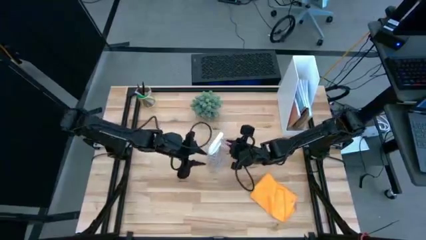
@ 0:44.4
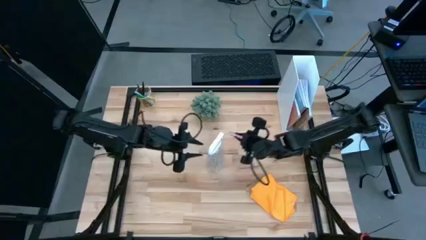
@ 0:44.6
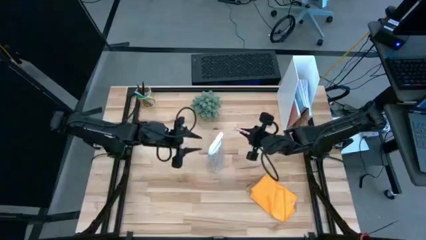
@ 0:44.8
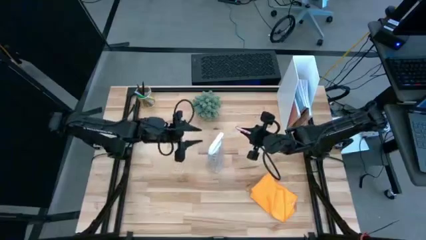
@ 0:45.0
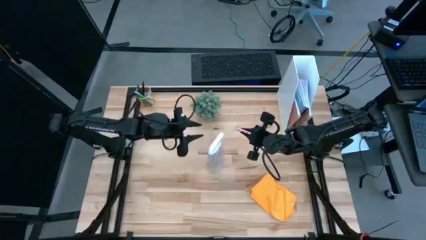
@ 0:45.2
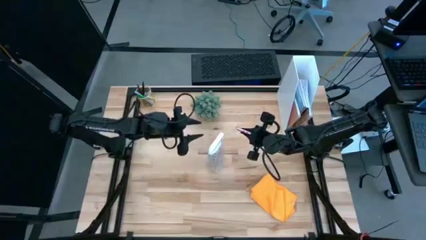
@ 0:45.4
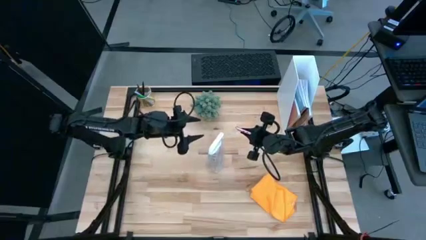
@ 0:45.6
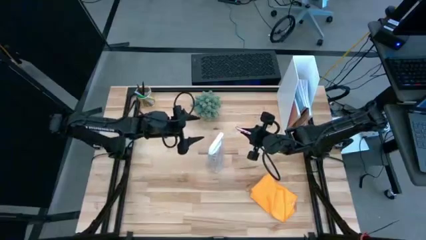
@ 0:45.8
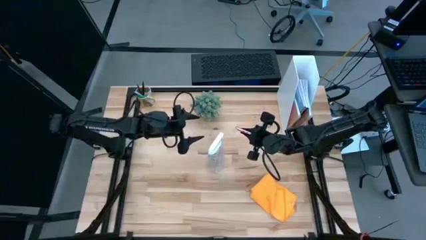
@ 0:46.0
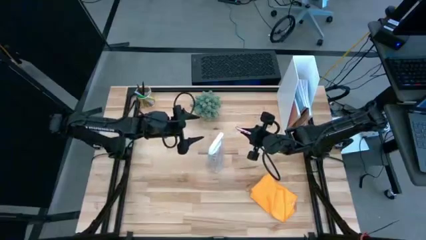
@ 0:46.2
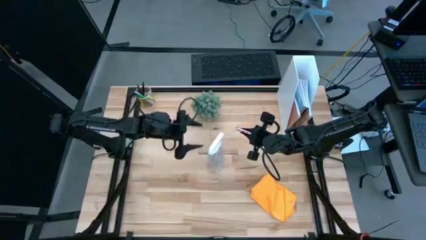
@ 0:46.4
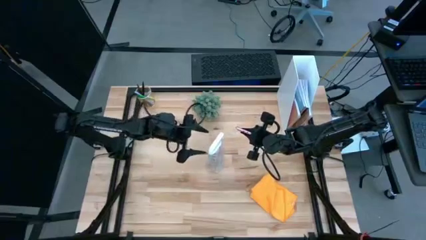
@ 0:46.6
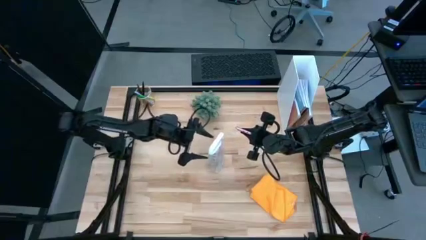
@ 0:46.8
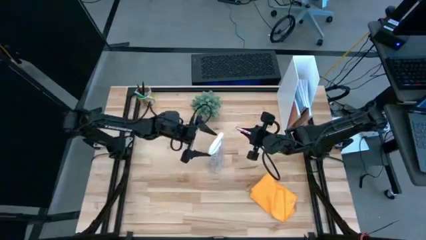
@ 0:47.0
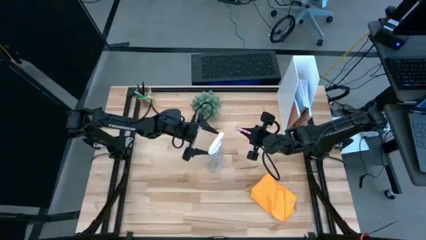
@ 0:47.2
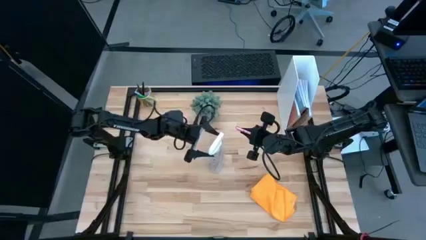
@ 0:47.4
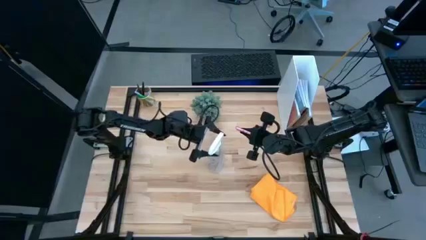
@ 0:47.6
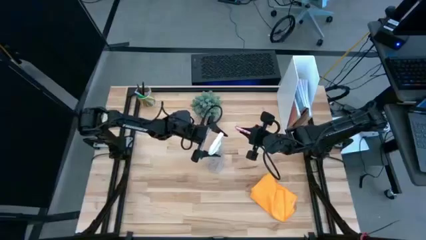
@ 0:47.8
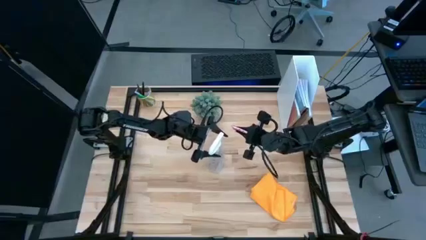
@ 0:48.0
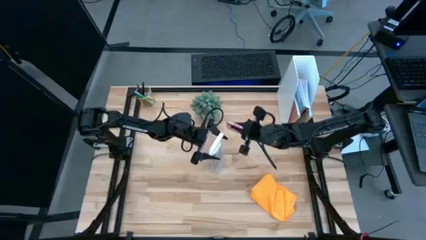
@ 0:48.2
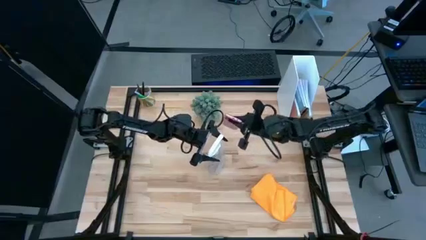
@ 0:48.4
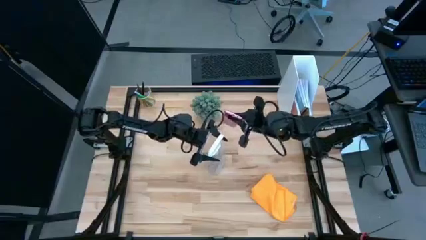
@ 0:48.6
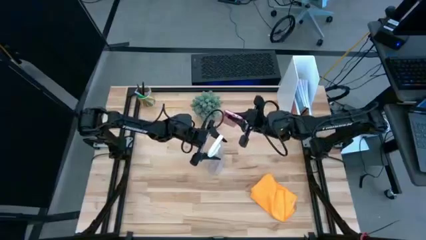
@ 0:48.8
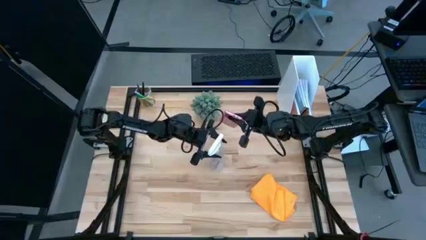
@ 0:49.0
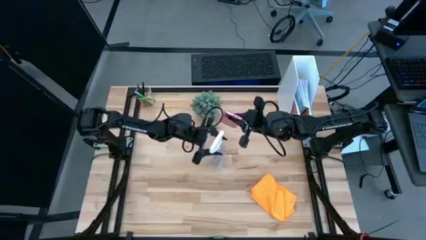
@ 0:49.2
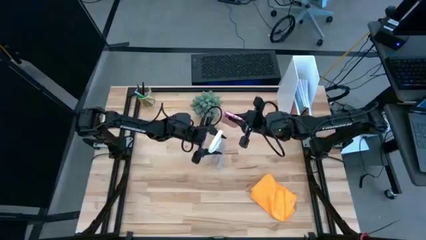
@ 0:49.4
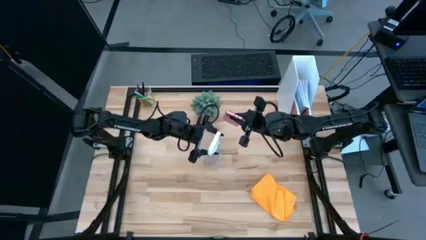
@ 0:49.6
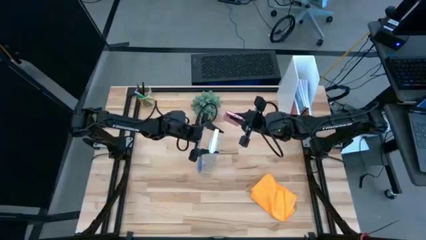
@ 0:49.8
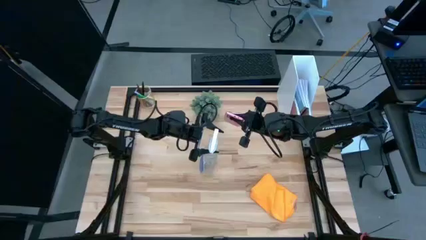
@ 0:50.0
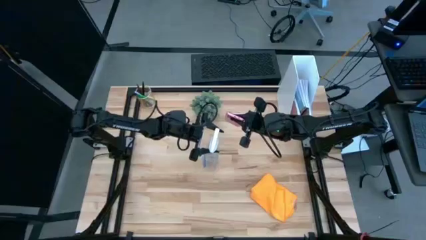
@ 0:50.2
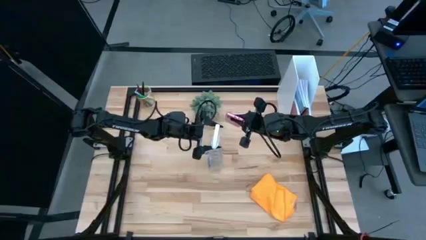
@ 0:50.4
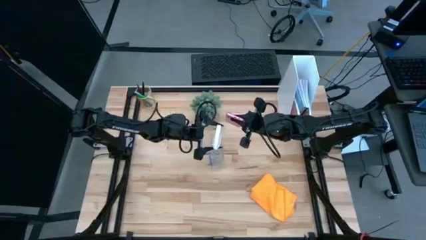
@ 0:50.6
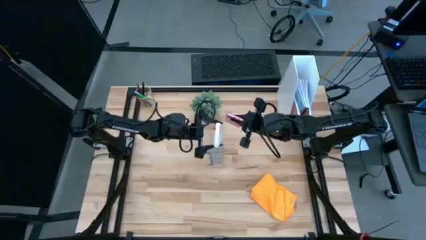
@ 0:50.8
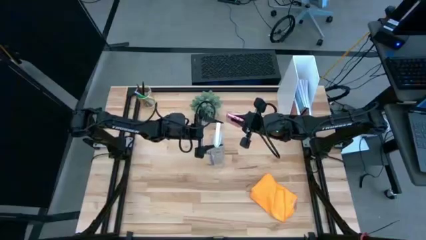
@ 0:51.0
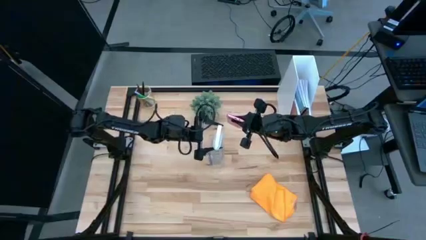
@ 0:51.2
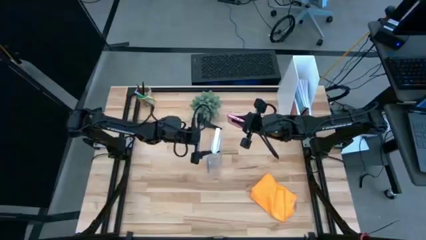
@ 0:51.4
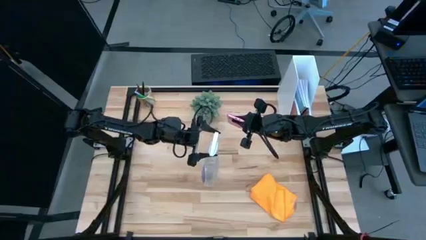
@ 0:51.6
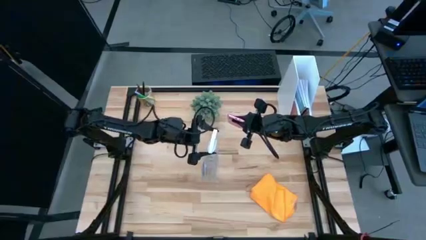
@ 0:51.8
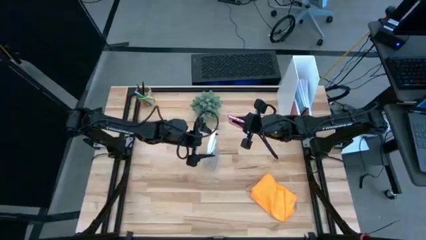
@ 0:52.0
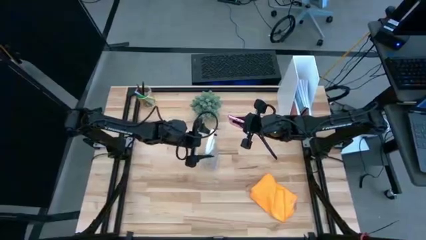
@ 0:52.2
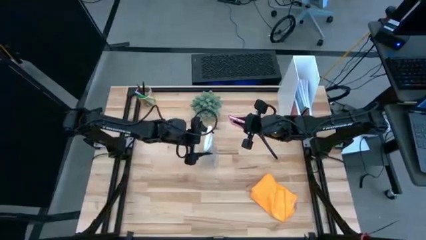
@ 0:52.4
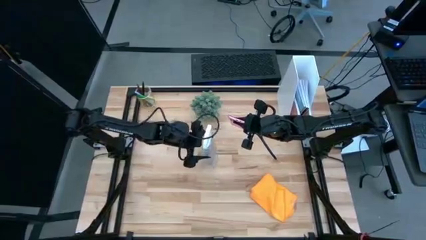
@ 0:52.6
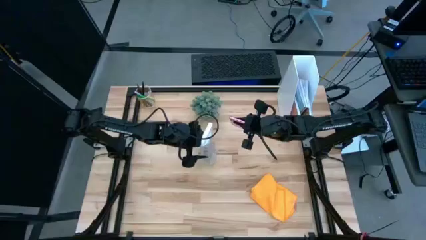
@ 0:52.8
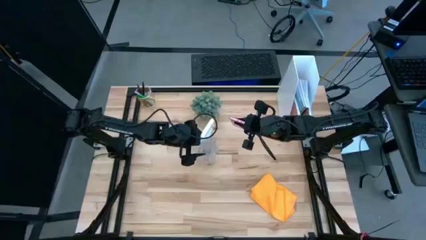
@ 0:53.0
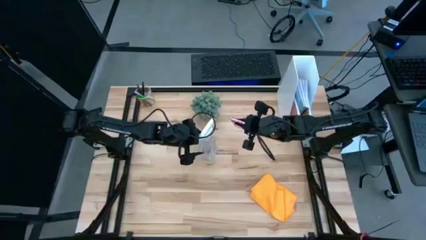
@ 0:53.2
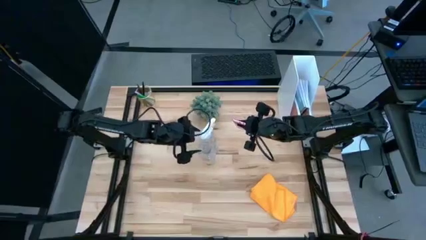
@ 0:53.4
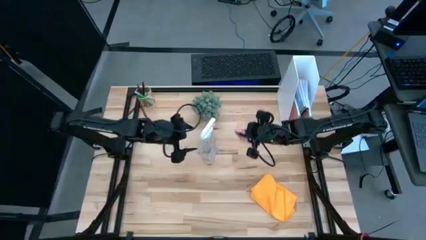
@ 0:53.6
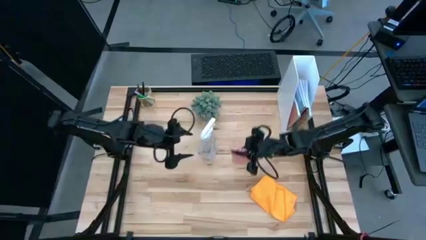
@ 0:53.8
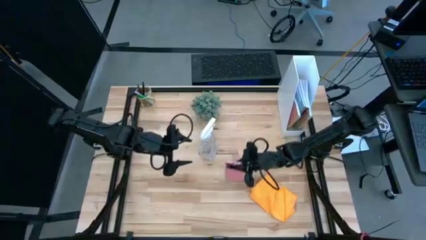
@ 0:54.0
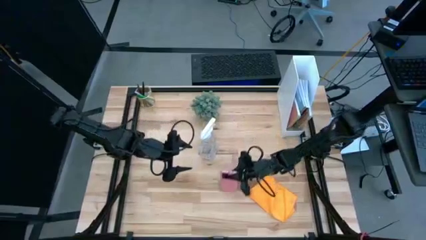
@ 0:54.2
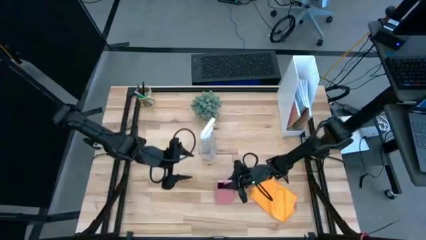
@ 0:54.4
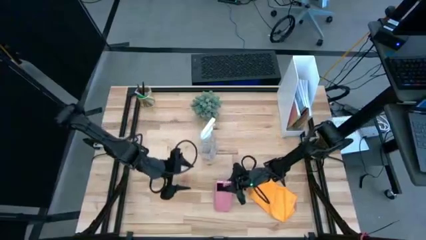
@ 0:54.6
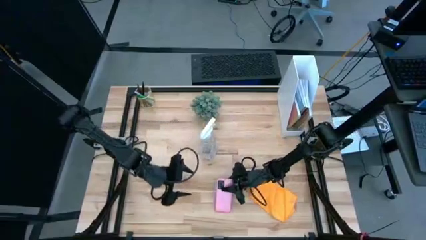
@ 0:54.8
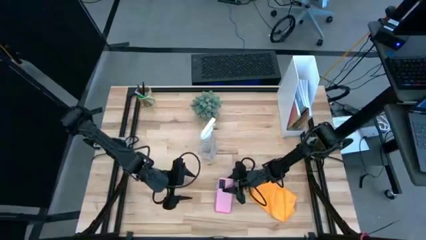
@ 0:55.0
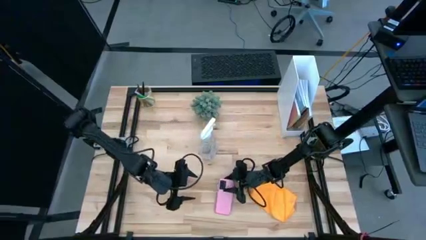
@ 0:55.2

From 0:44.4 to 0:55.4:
Task: Apply microfiber cloth
Spray the back of the pink phone with the white spray bottle

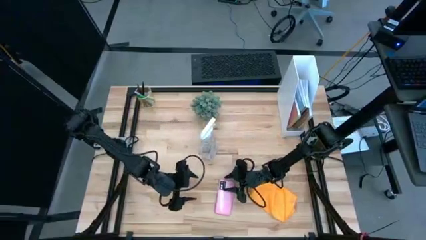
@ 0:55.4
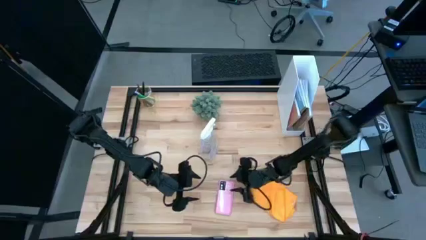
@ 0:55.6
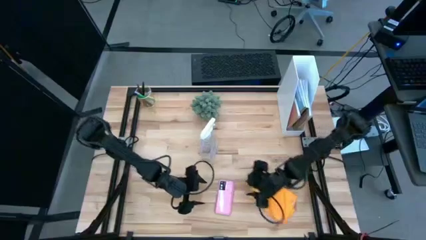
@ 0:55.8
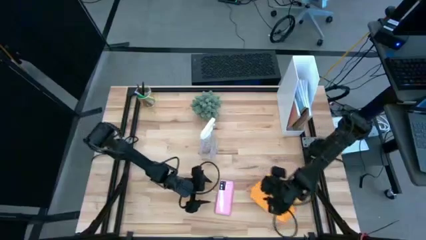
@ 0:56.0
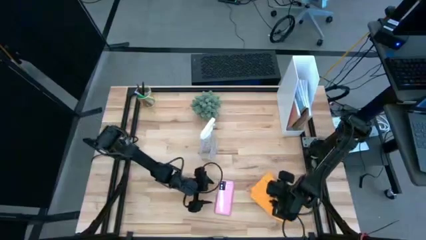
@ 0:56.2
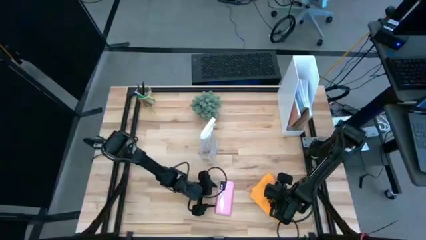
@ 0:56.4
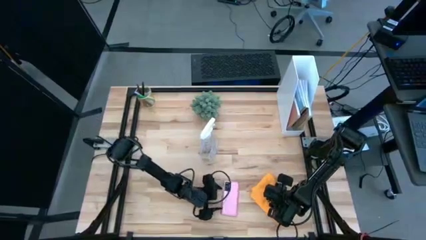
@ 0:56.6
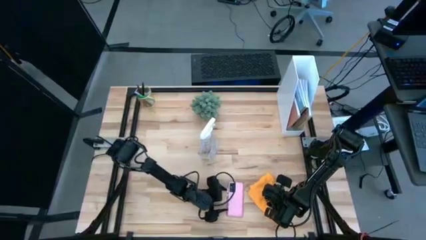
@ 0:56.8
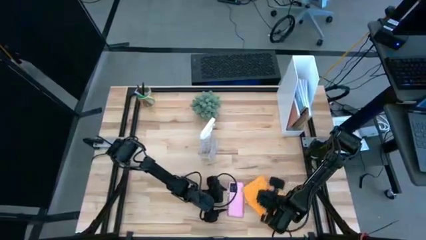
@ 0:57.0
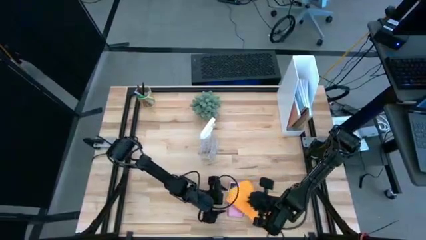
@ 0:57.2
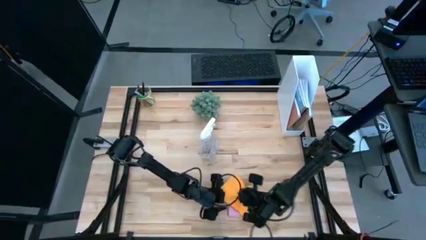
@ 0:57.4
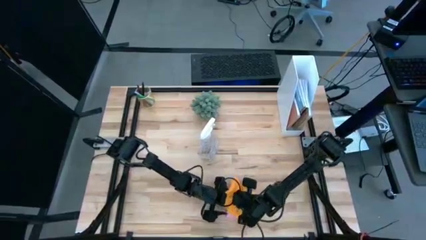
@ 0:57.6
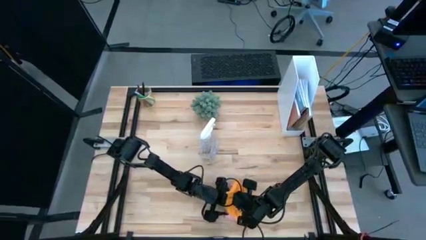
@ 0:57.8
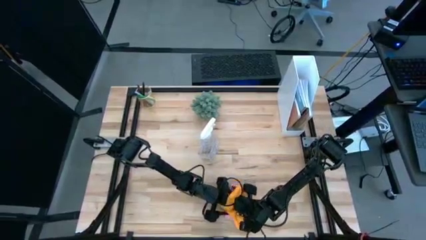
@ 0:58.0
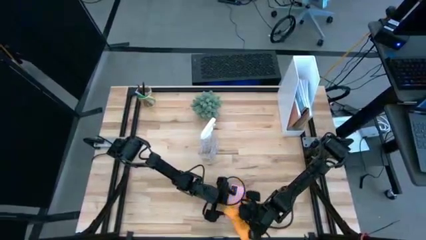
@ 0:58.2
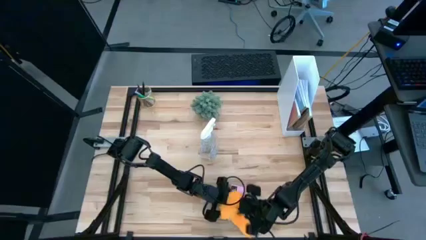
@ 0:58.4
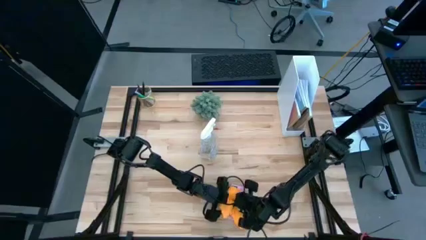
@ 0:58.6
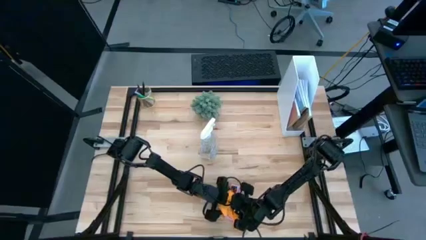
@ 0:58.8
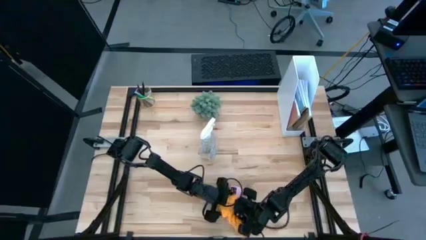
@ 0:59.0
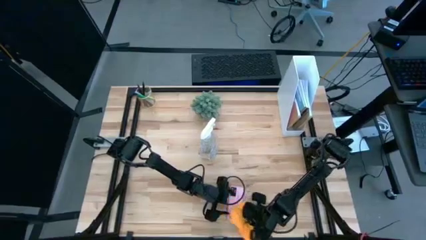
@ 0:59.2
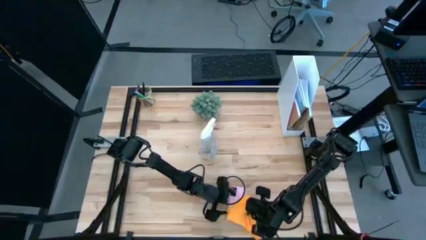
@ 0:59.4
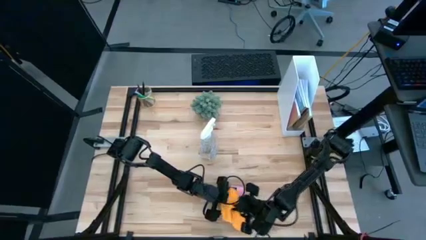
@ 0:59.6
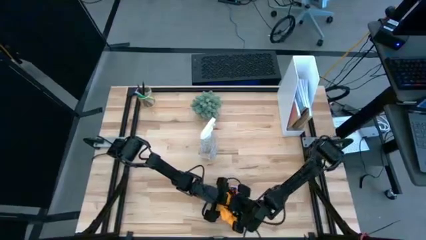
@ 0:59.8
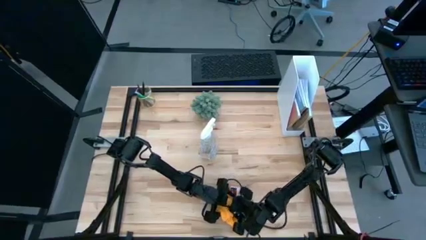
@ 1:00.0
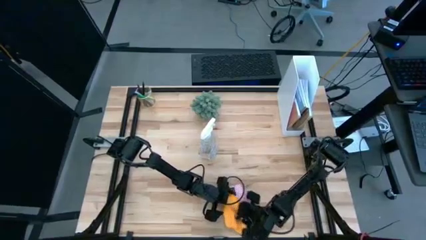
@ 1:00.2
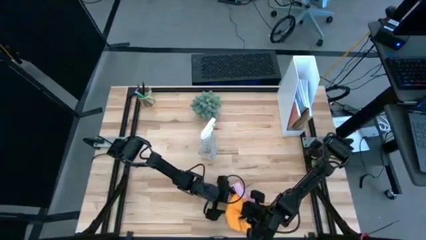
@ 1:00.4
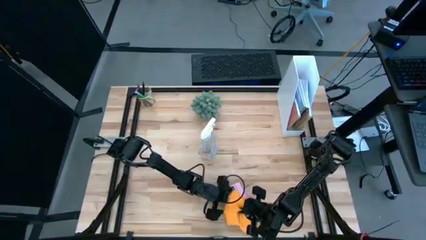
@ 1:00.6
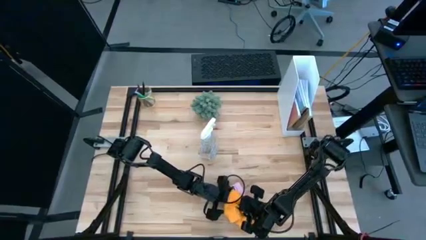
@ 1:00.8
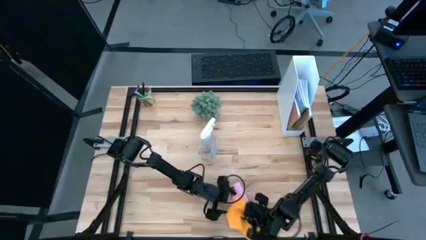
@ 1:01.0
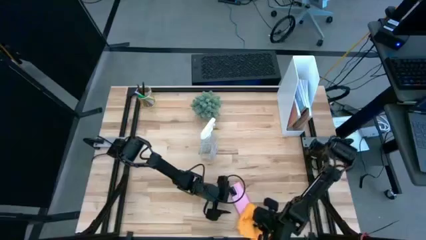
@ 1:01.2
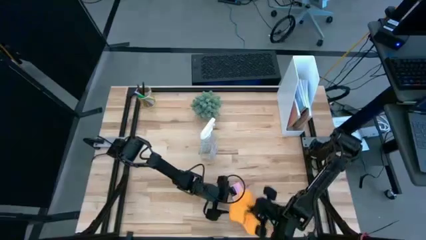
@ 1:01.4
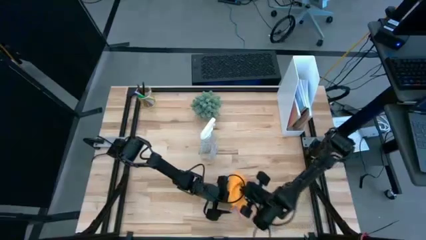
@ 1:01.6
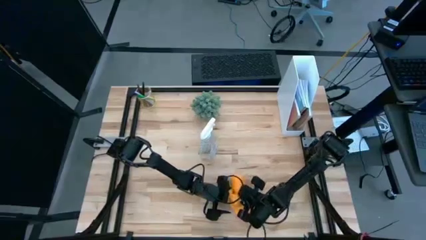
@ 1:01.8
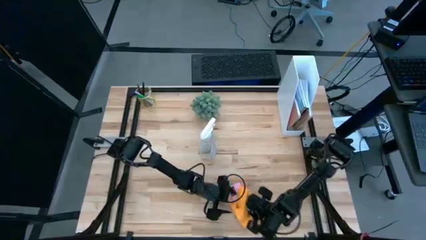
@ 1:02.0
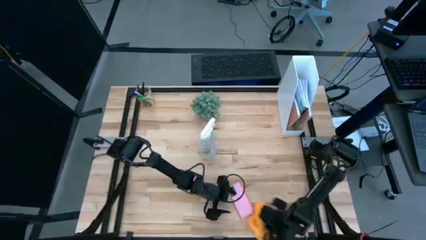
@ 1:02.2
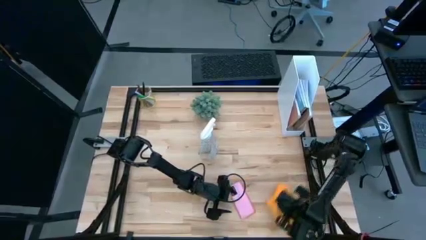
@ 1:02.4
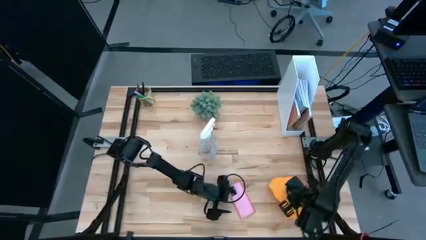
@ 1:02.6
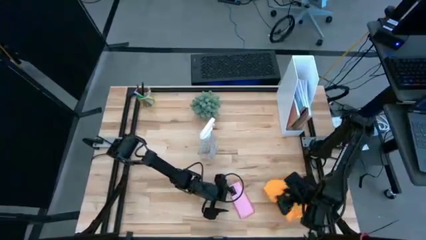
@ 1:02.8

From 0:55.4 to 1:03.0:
Wipe the back of the pink phone with the orange microfiber cloth
